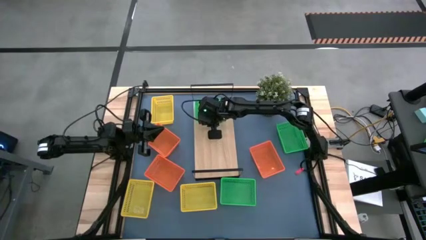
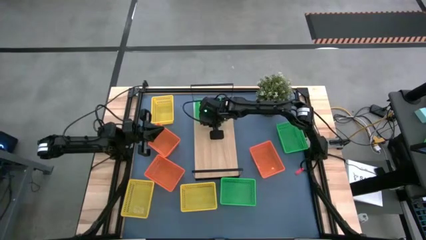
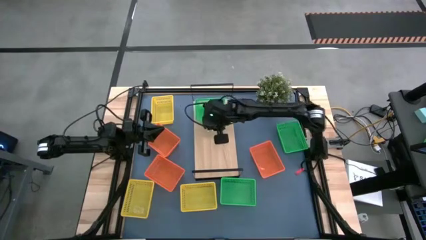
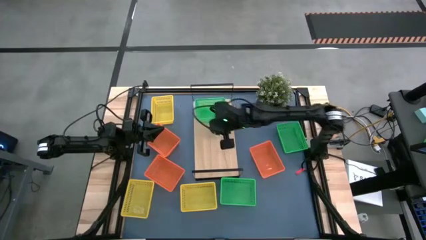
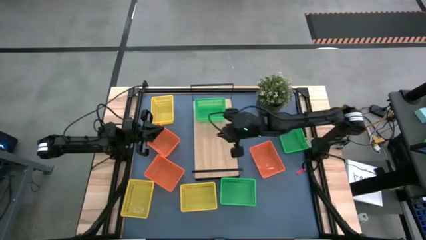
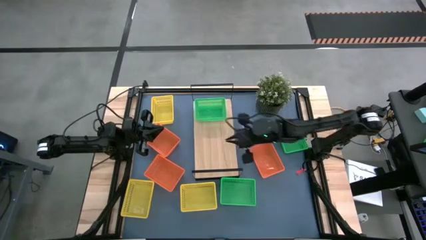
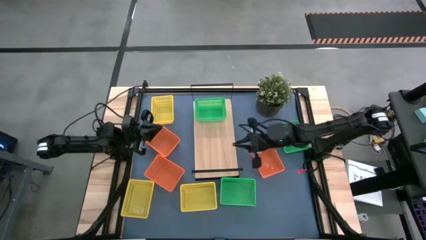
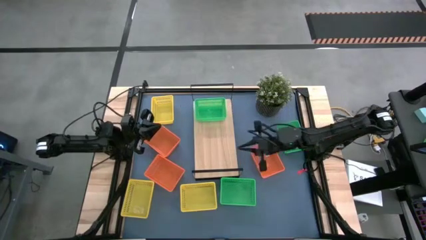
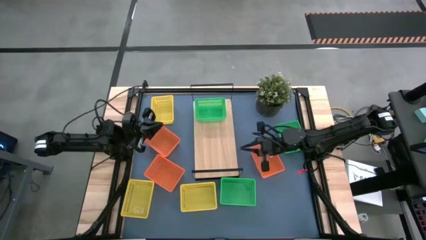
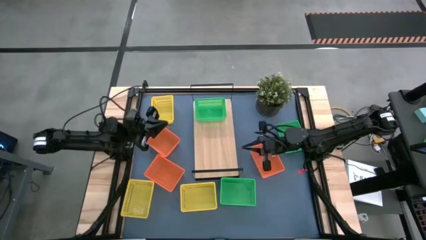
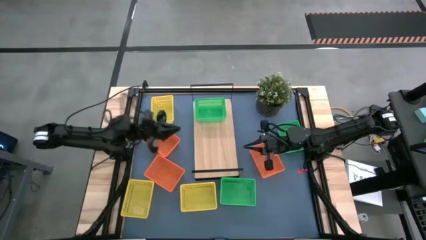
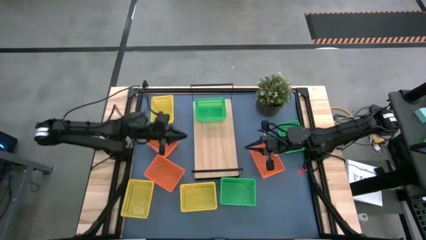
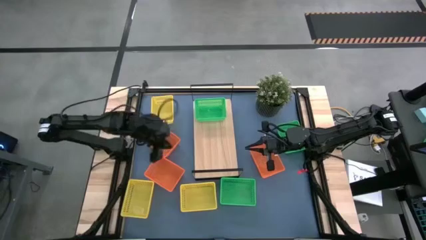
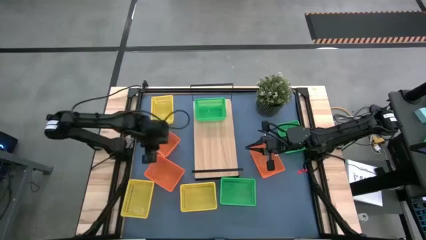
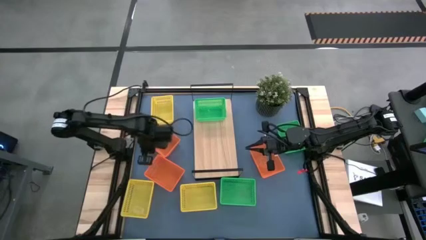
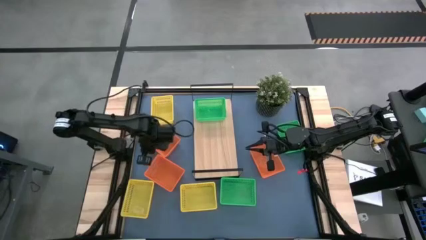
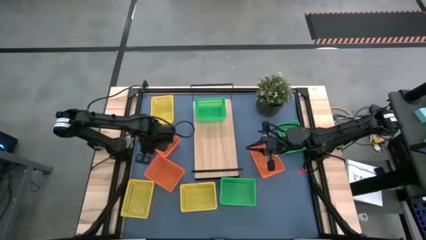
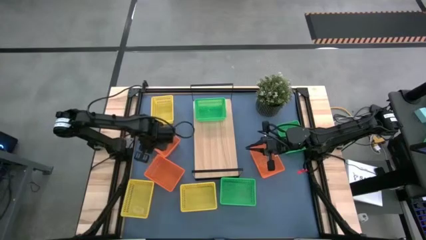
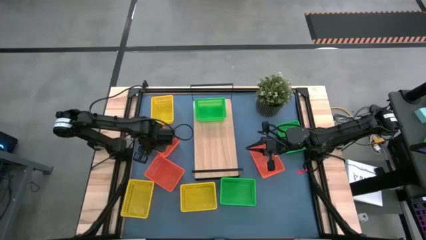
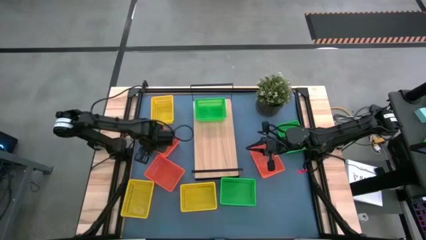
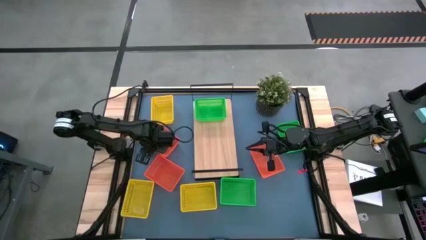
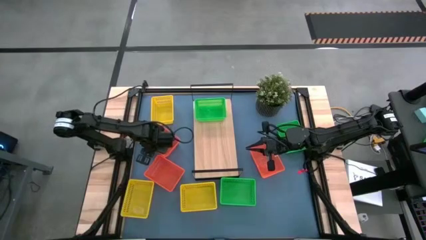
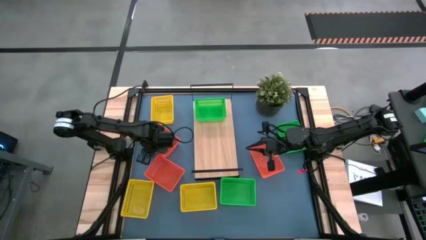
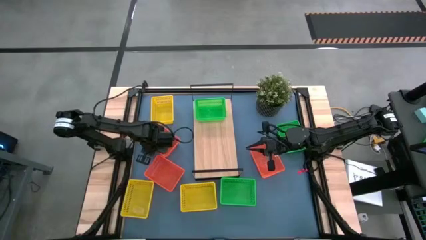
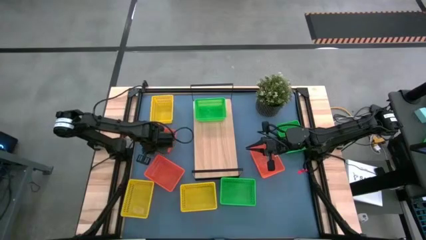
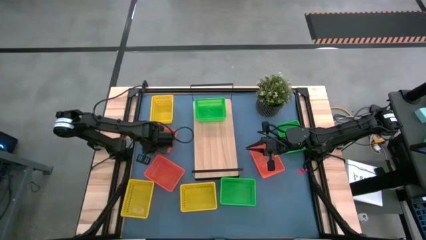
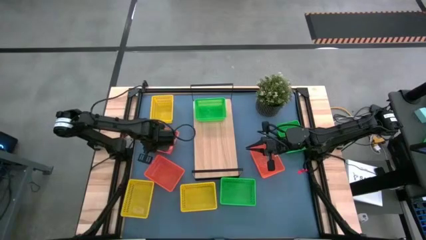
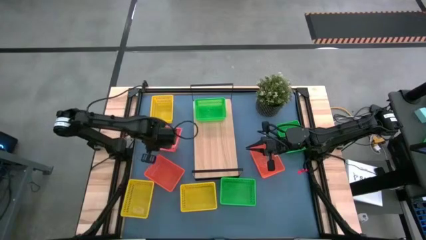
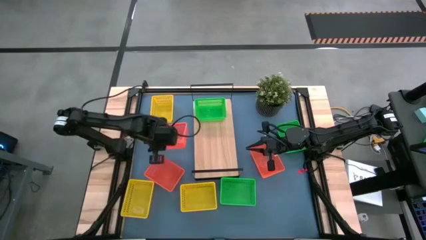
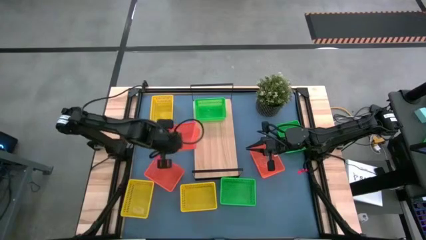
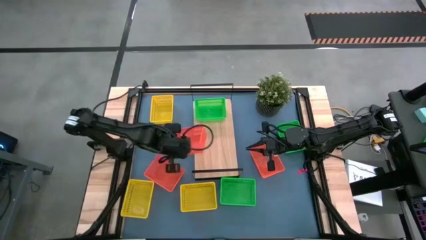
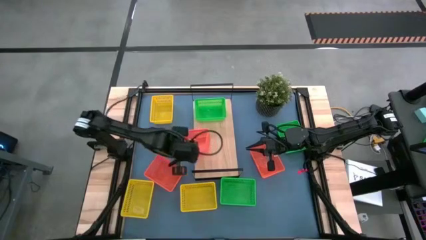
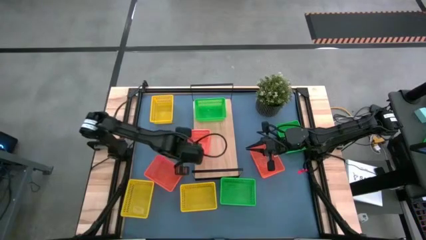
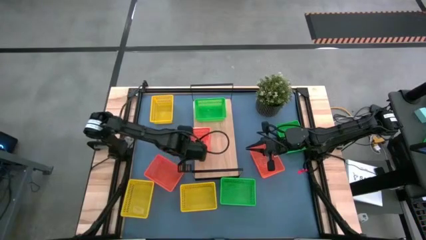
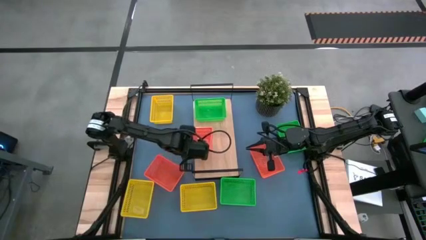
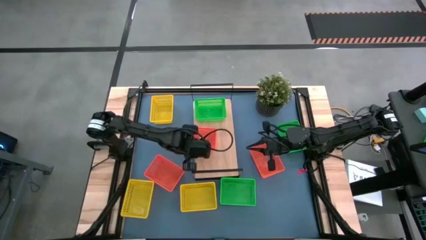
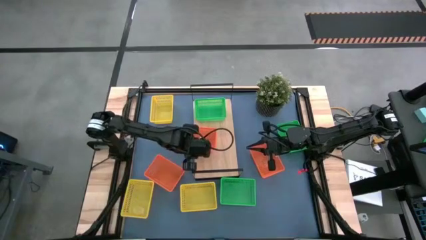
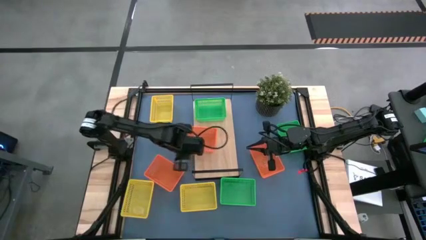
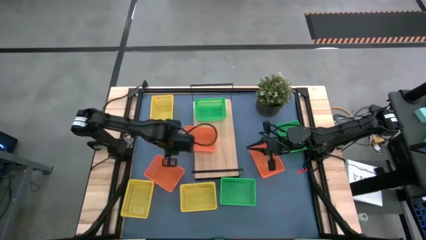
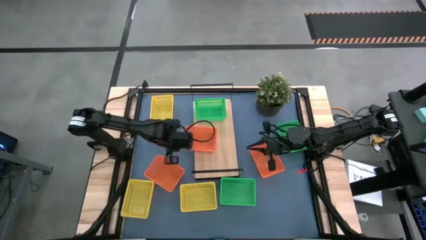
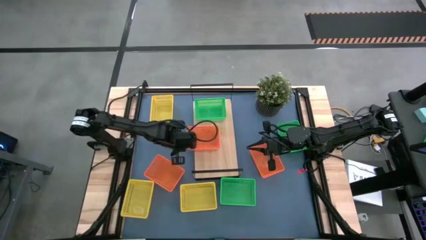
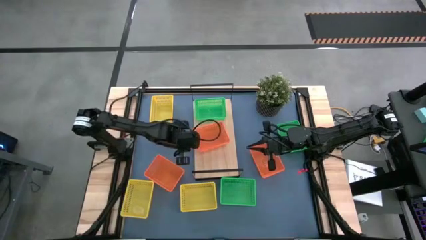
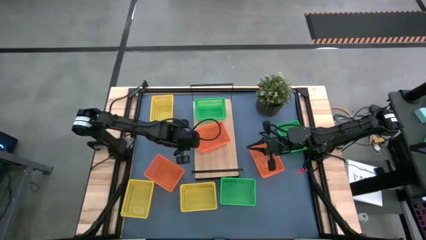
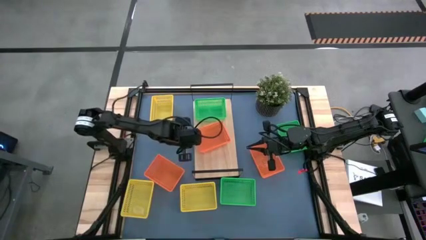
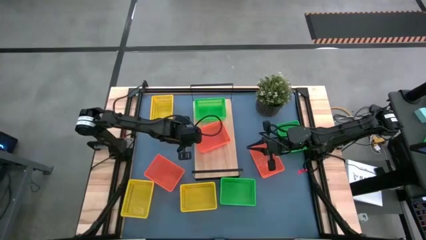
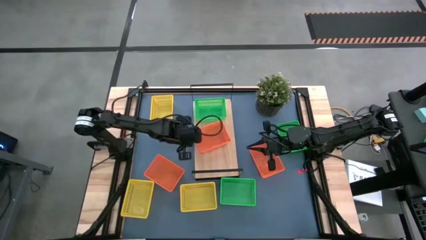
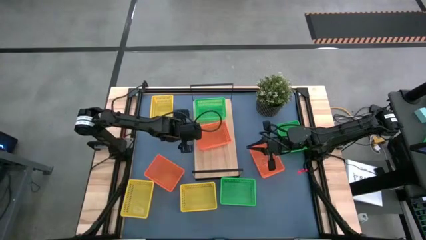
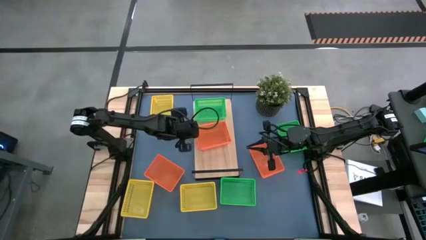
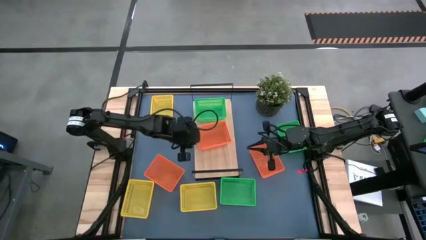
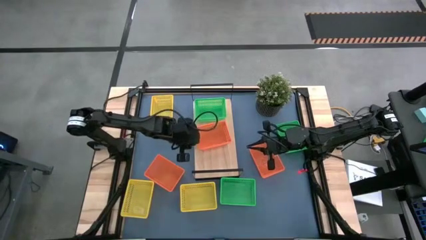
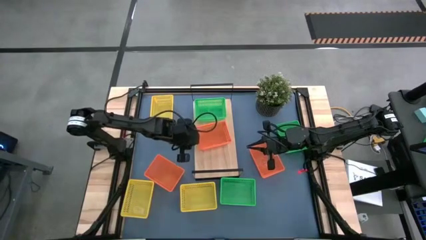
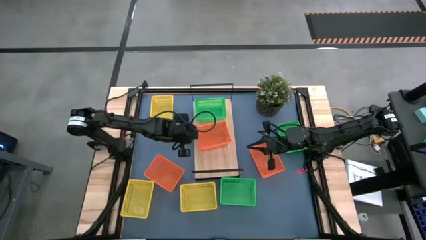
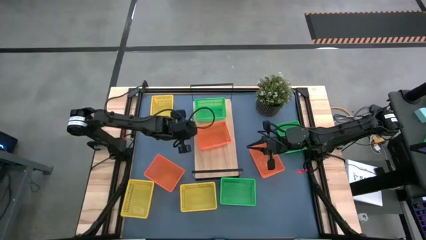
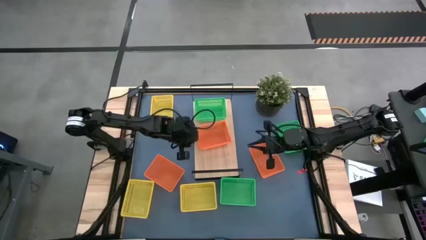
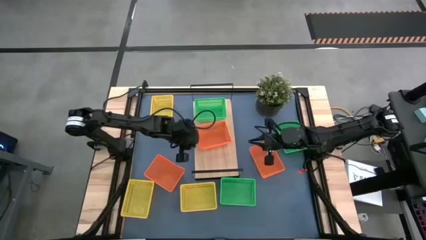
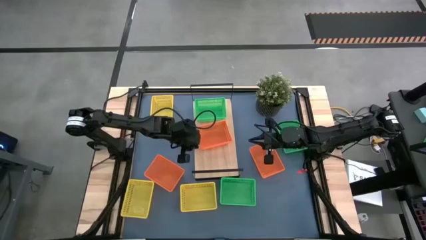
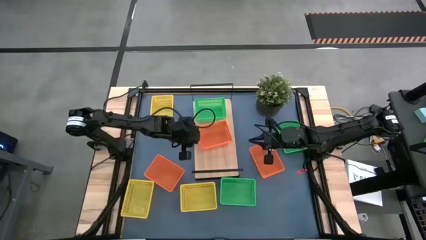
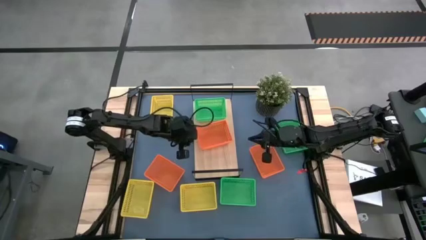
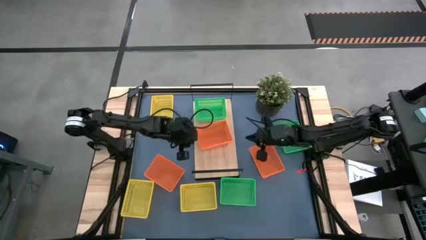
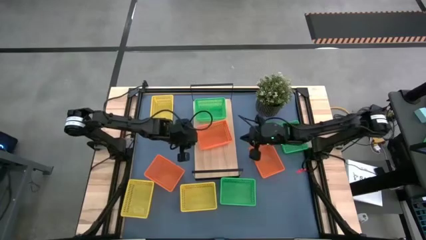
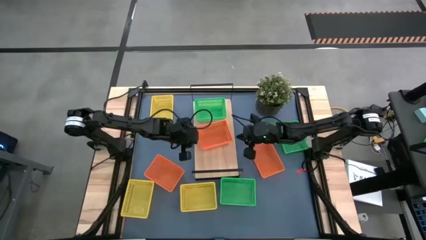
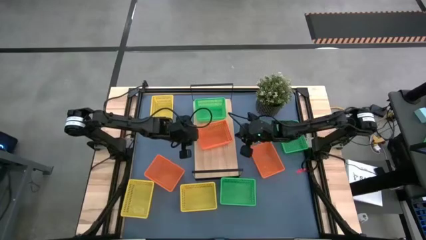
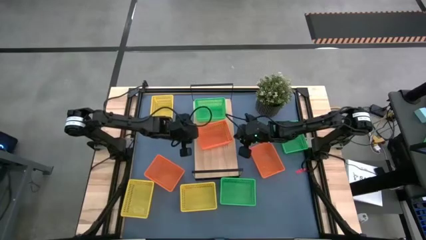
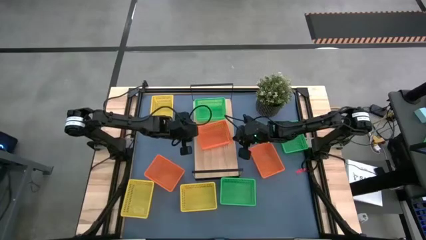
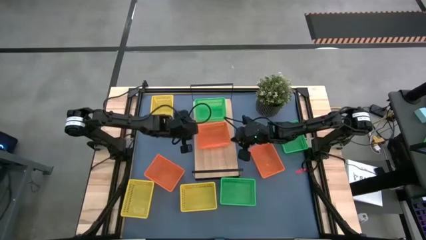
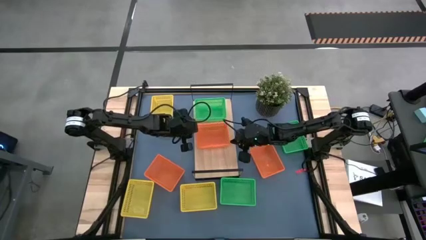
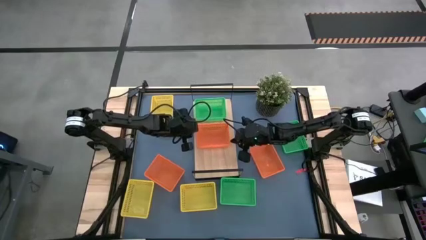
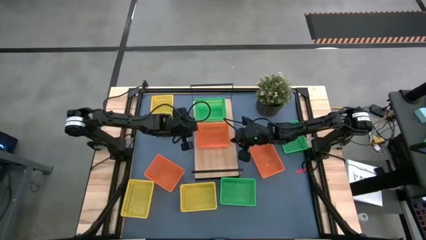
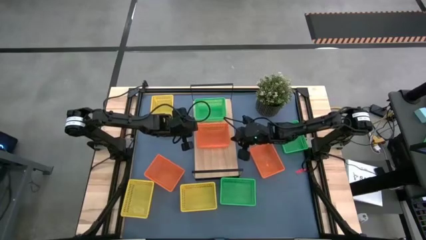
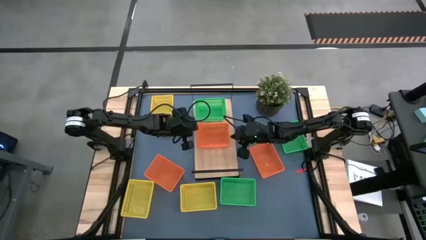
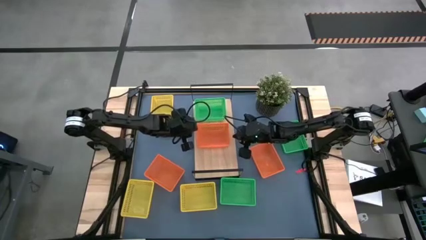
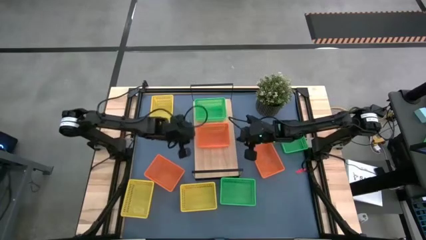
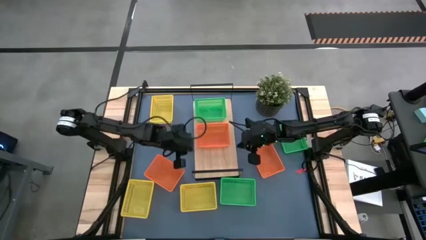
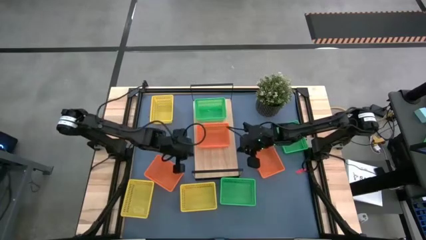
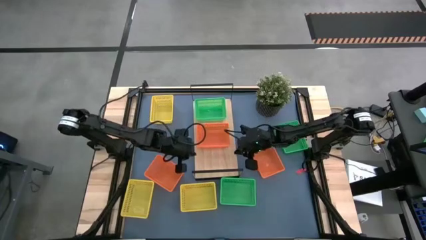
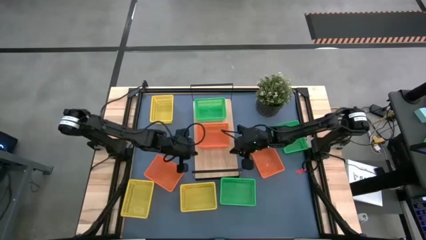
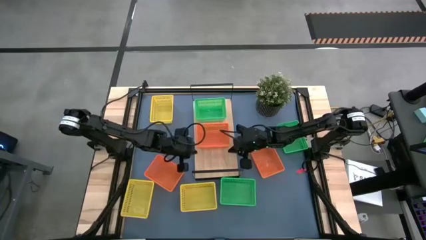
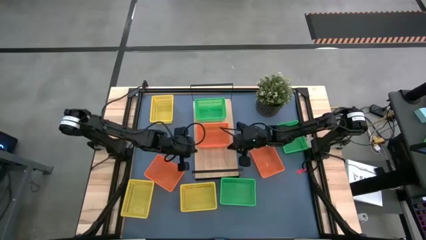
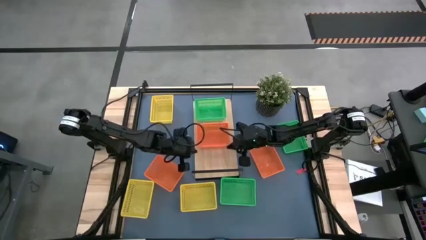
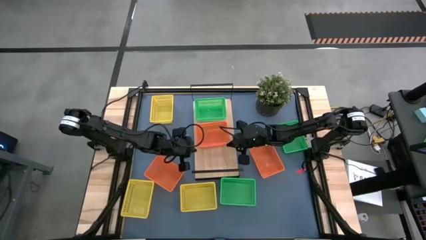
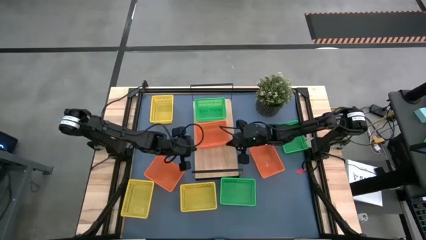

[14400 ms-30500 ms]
Task: Stack baskets on shelf by color
Put the top left orange bin on the shelf
